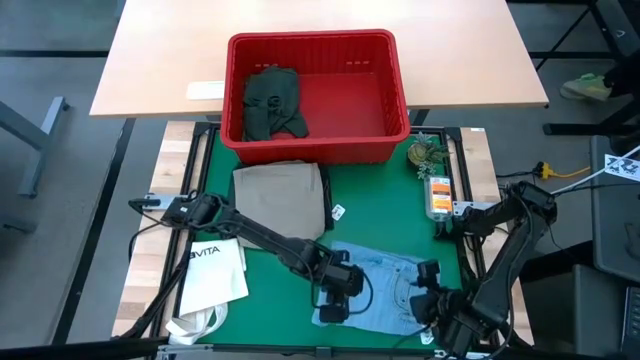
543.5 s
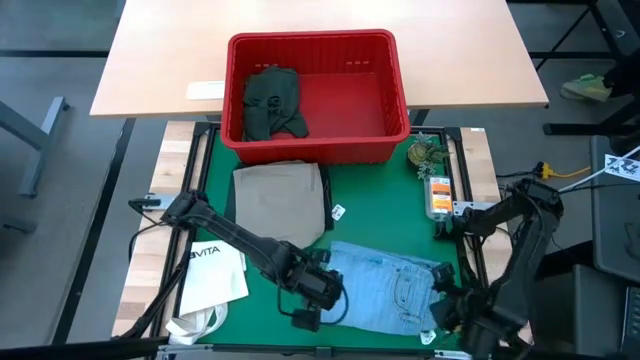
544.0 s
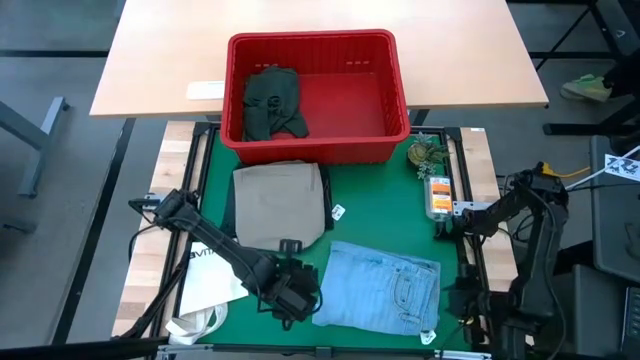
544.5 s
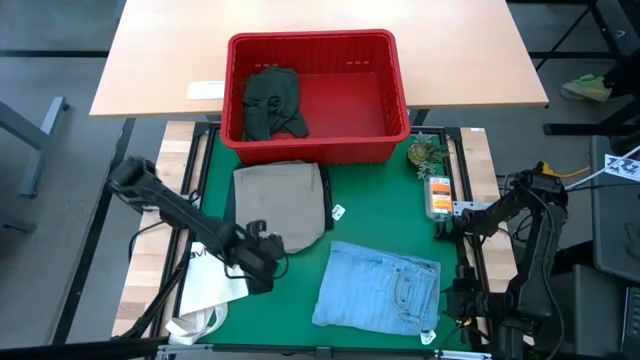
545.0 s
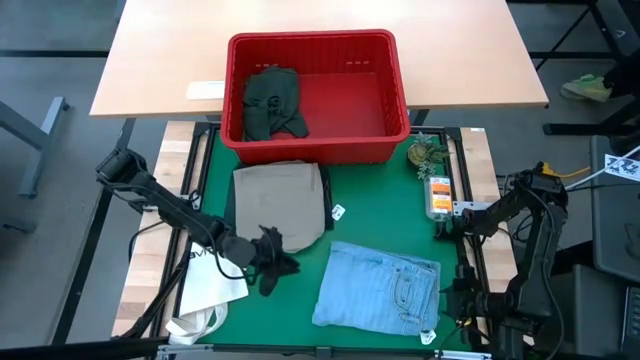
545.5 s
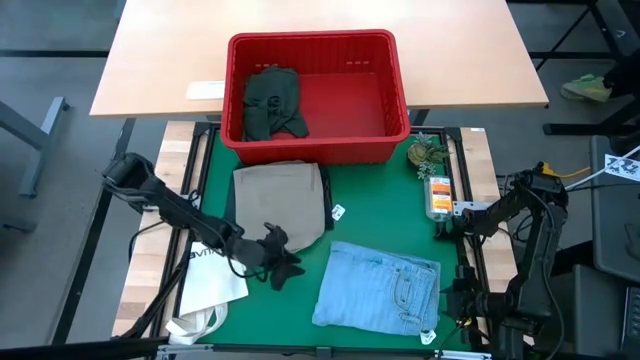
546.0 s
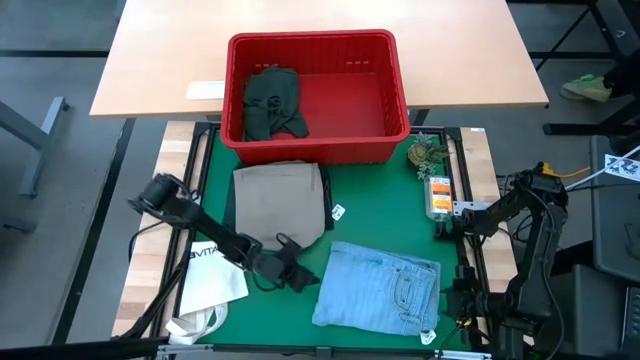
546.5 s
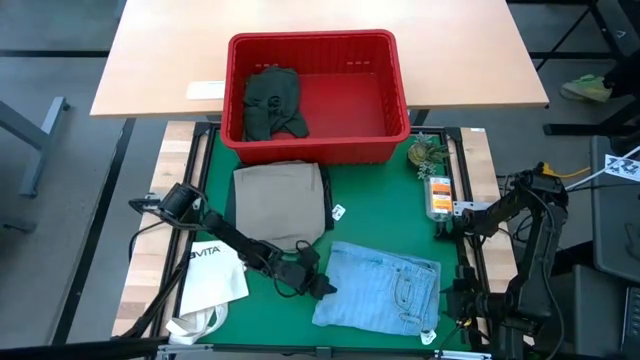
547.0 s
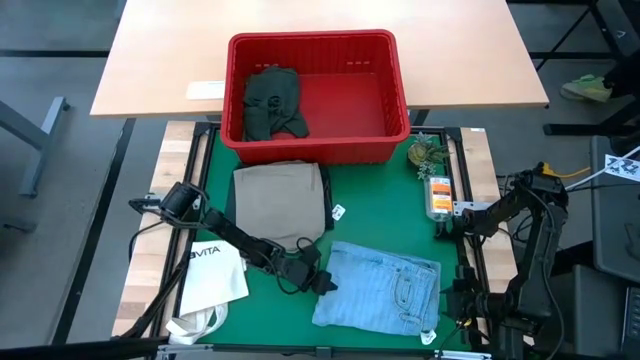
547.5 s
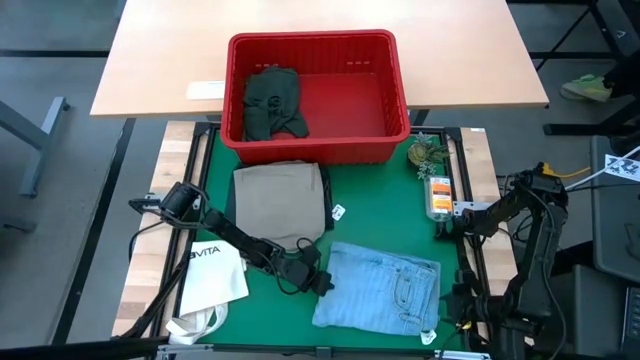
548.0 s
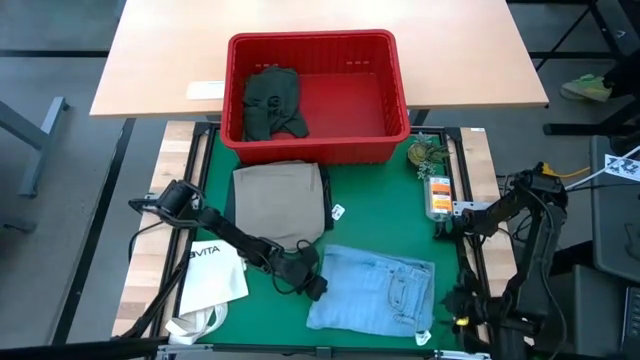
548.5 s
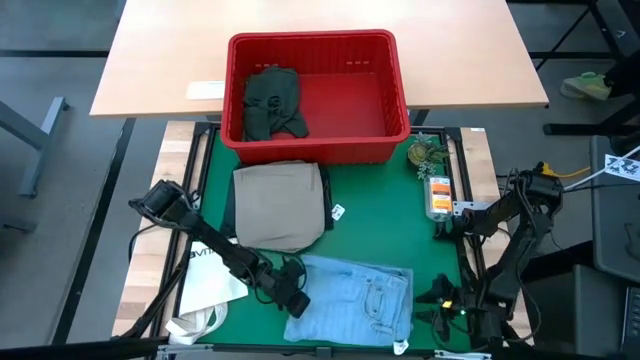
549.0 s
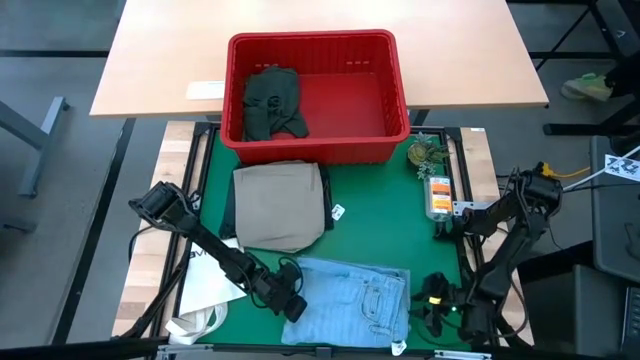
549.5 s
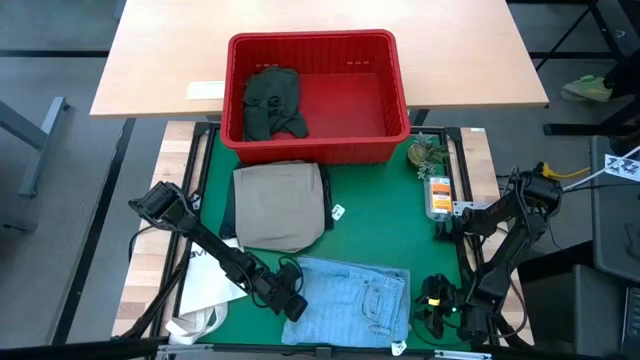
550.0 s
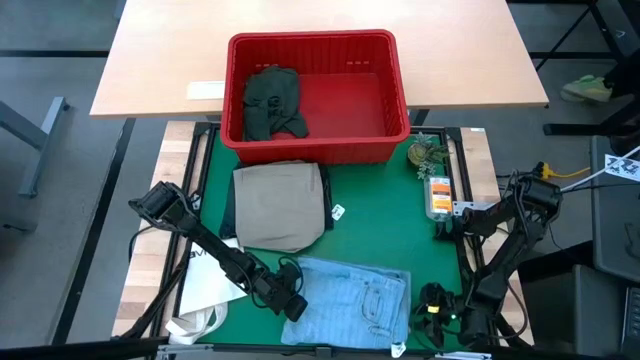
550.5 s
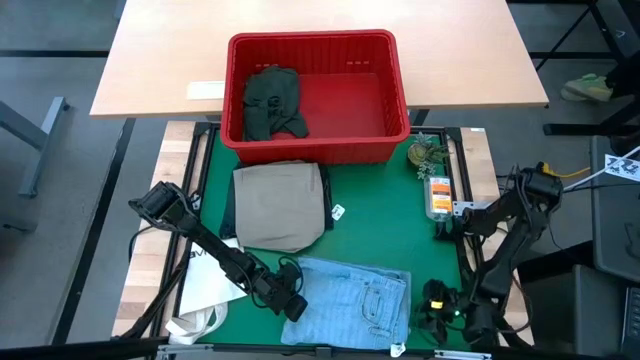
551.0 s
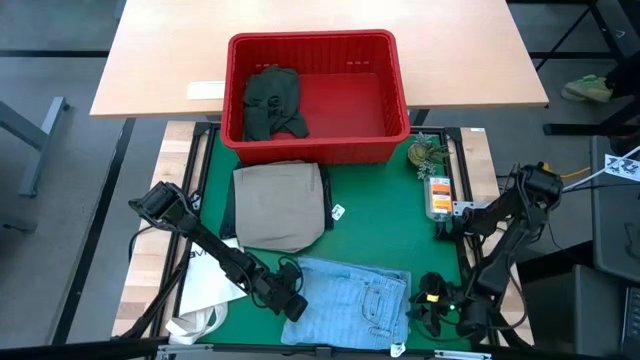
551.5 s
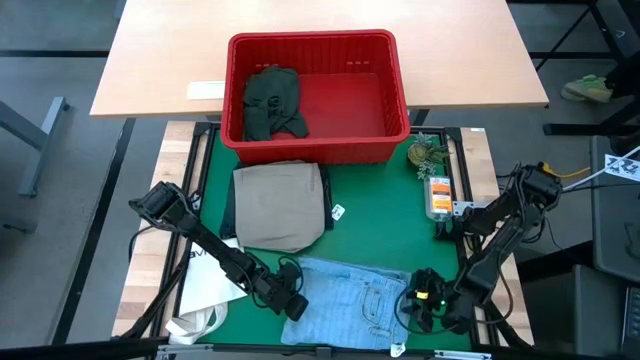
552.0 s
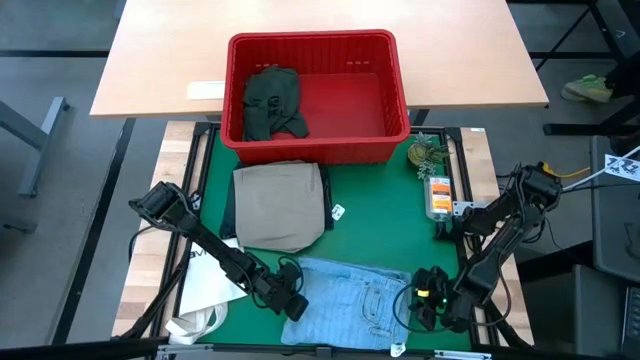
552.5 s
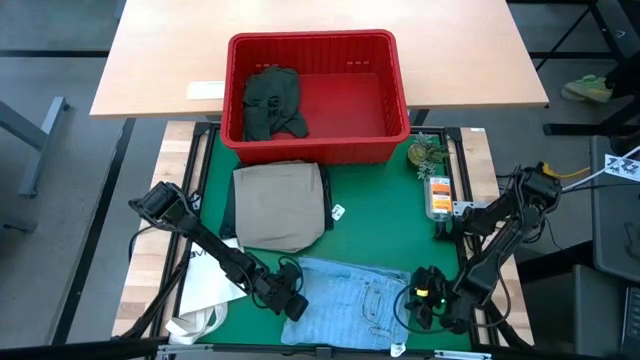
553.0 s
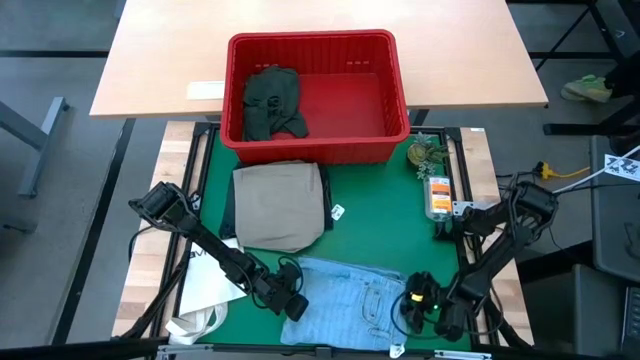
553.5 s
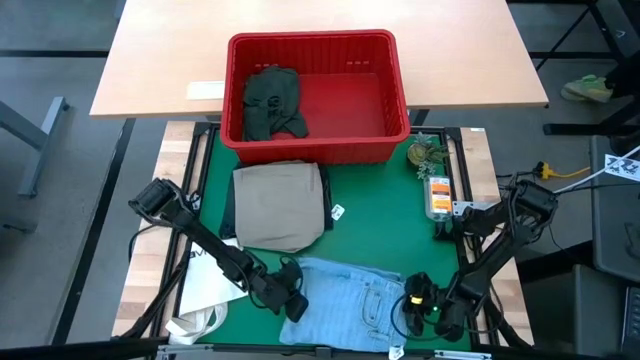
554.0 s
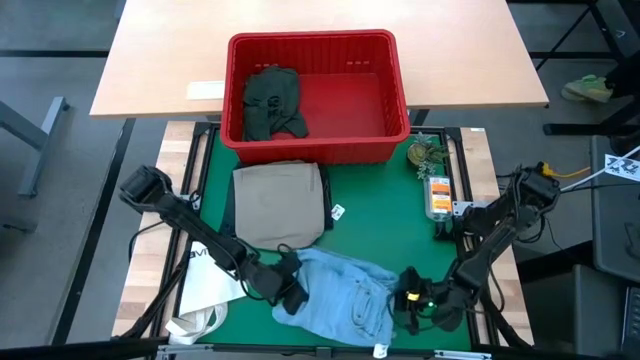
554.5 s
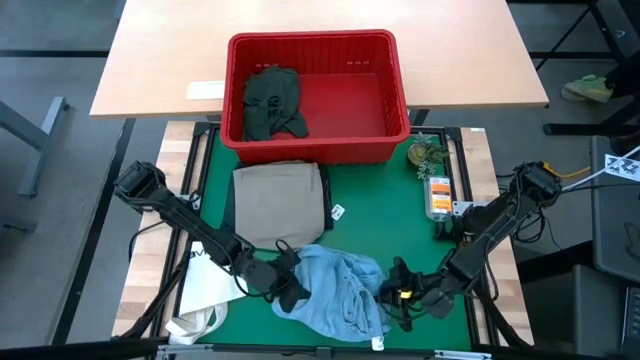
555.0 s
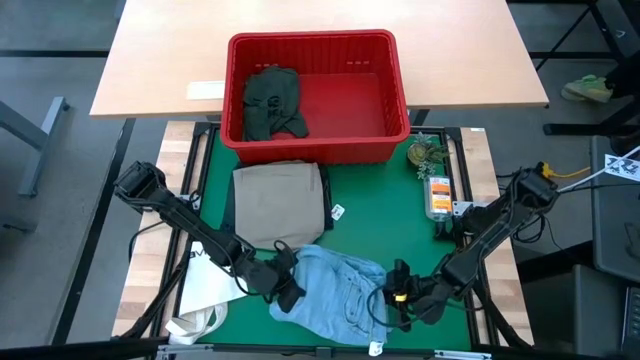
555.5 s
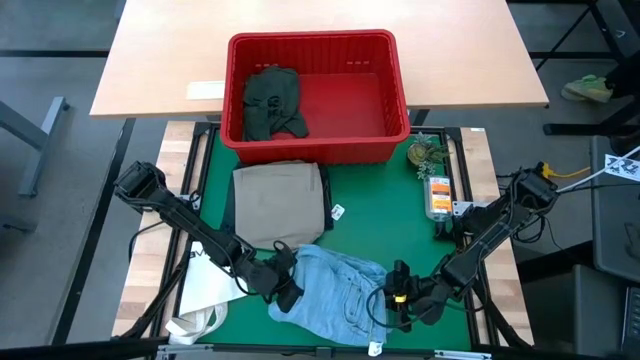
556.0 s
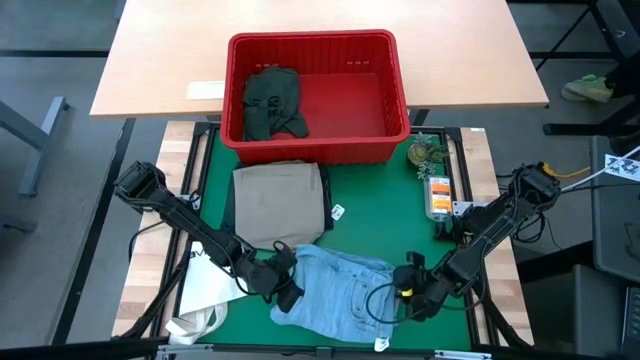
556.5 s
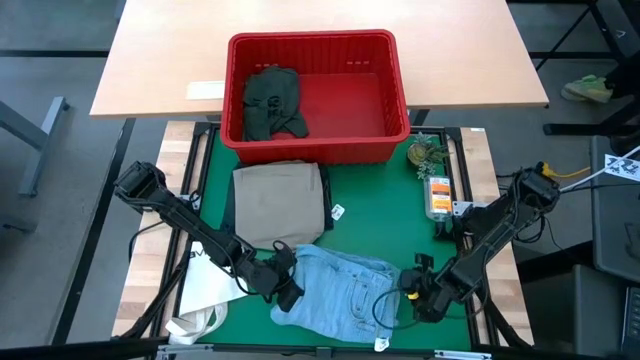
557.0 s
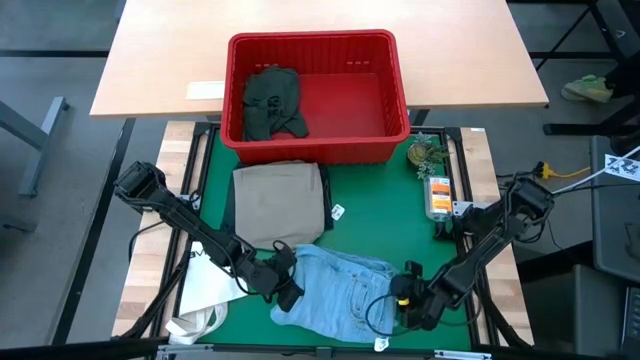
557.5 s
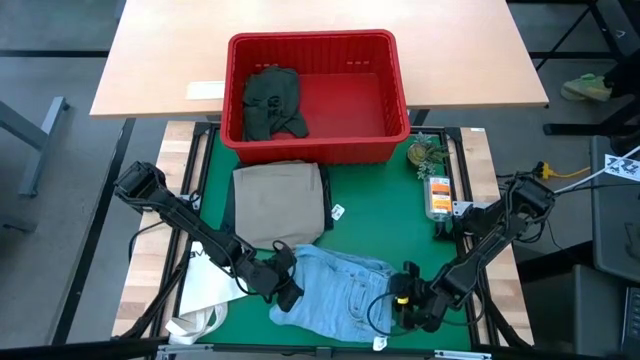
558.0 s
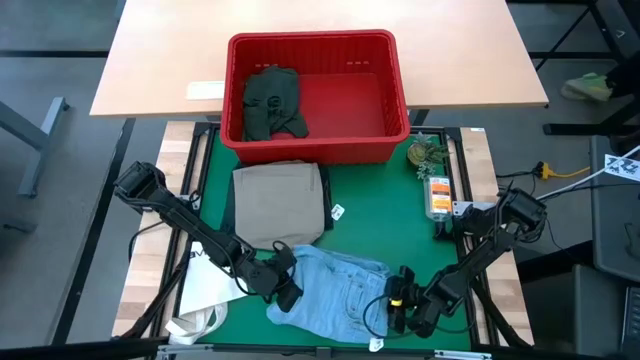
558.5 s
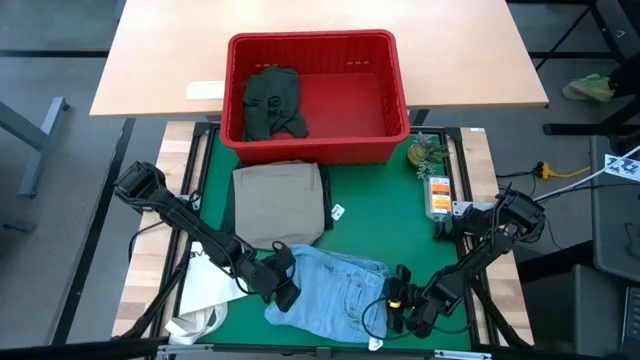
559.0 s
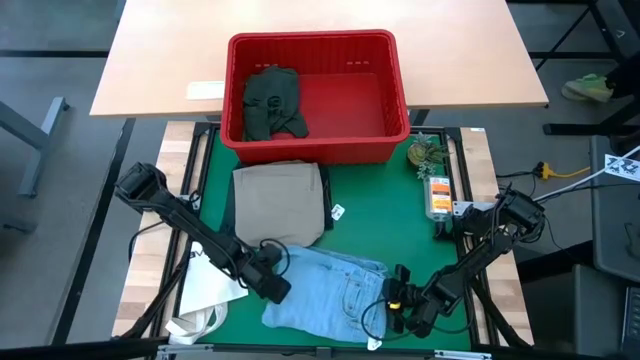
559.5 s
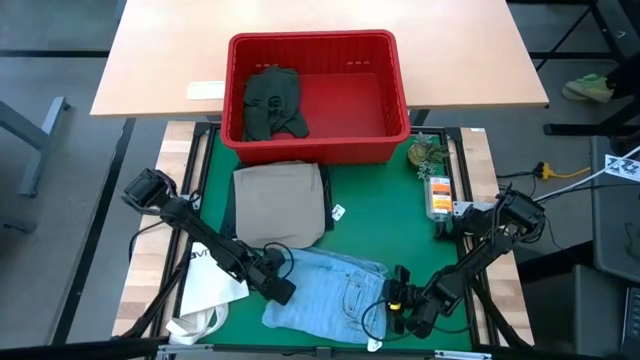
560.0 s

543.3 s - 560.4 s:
Task: Fold Laundry from Bin
Stack the folded light blue pants on top of the folded brown shorts

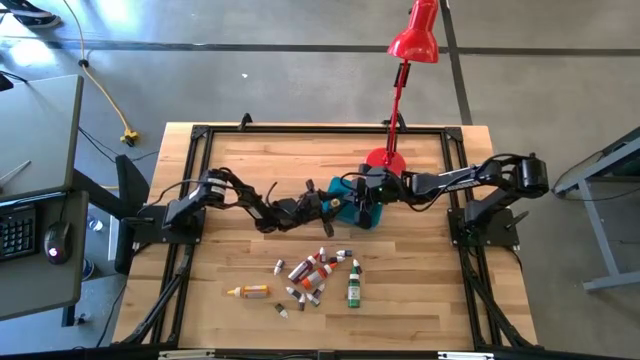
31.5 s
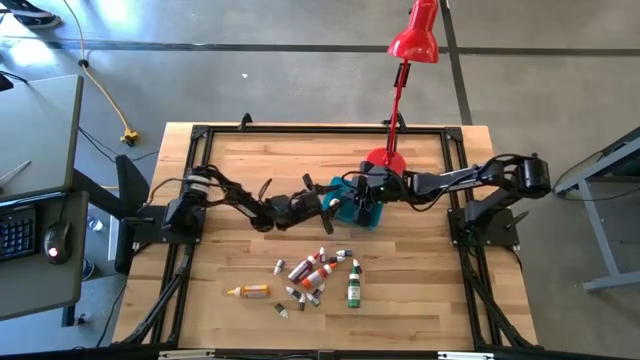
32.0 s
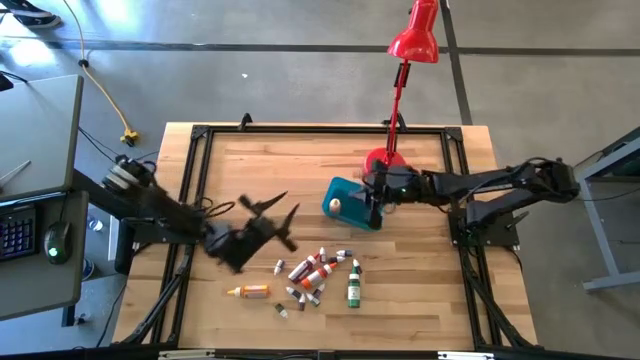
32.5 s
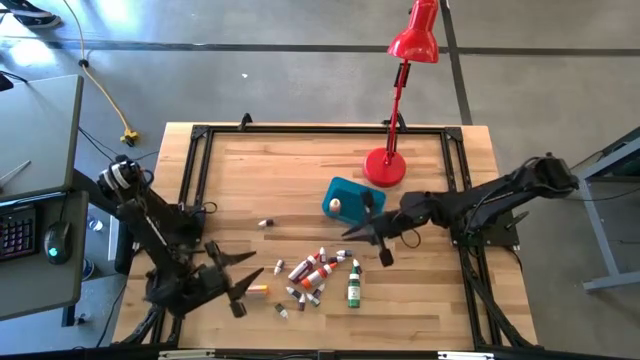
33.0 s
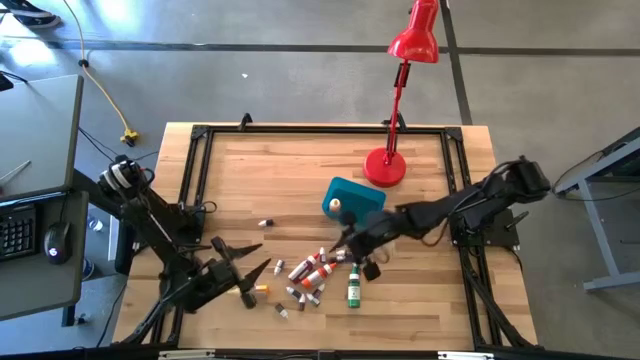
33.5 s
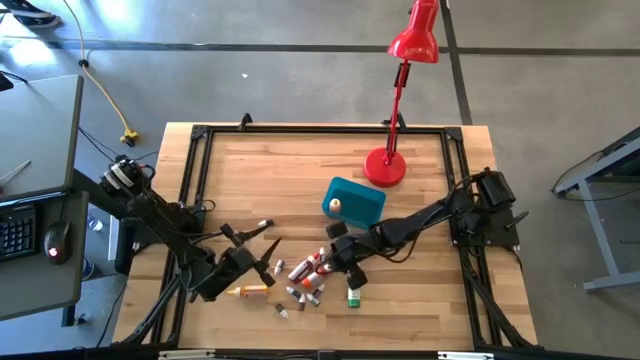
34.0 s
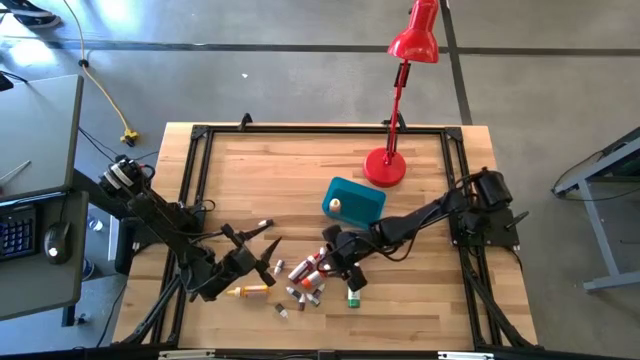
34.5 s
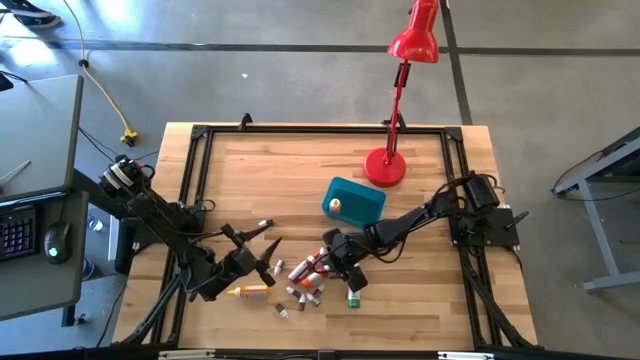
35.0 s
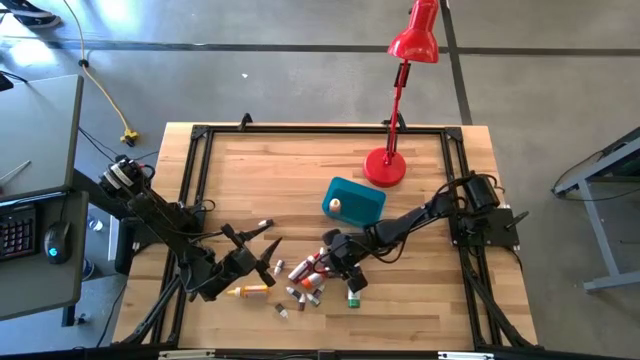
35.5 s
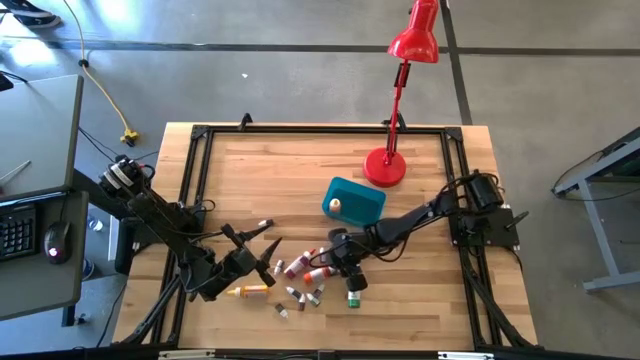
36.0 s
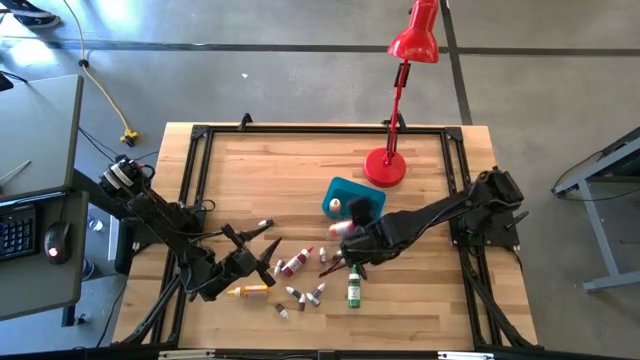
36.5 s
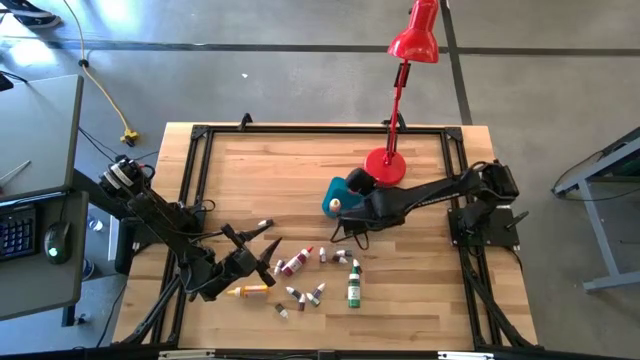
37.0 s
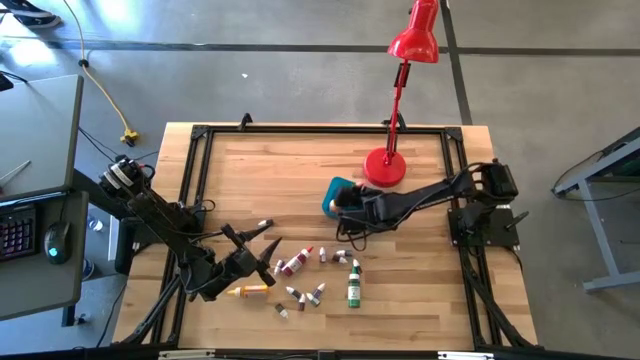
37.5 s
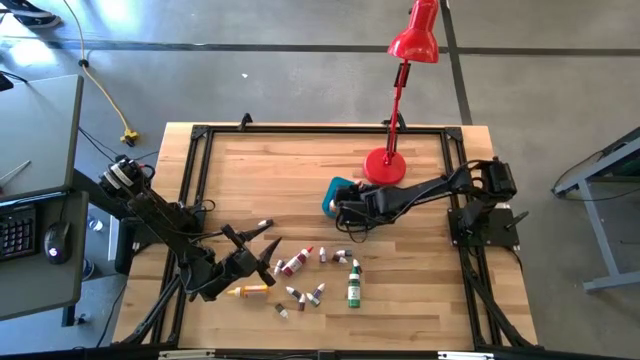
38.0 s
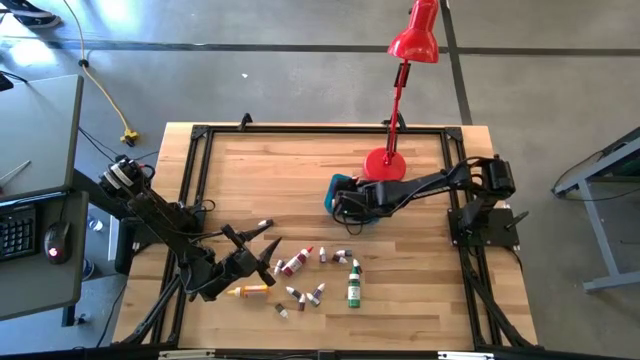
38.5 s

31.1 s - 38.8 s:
Task: Pick & Place food coloring
Put the big orange food coloring bottle into the blue container
